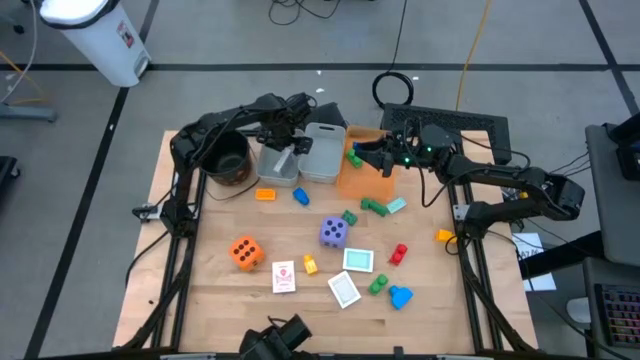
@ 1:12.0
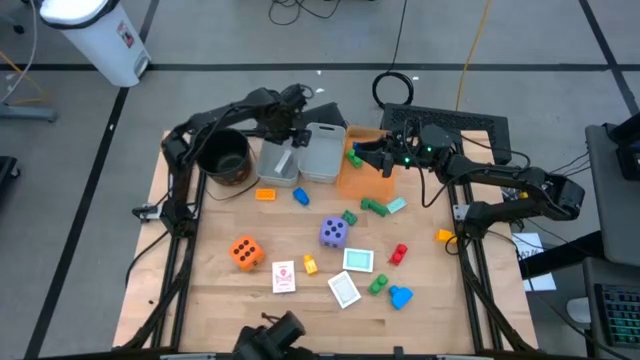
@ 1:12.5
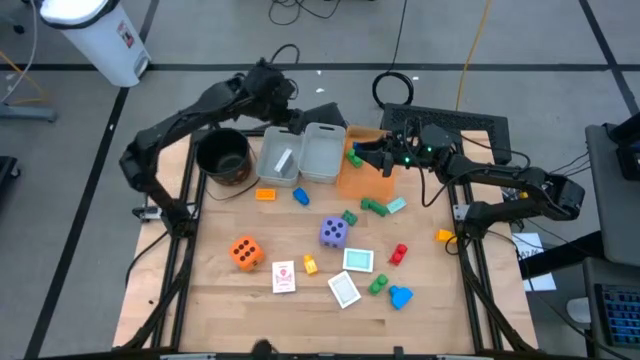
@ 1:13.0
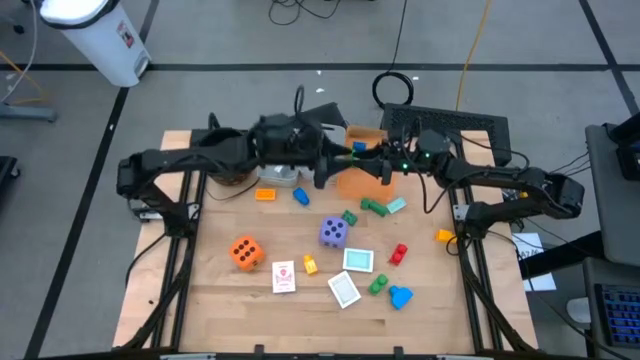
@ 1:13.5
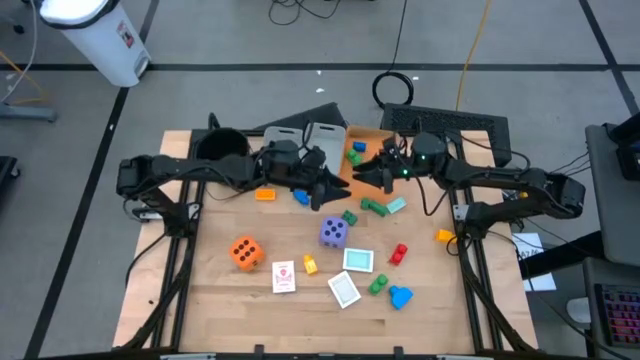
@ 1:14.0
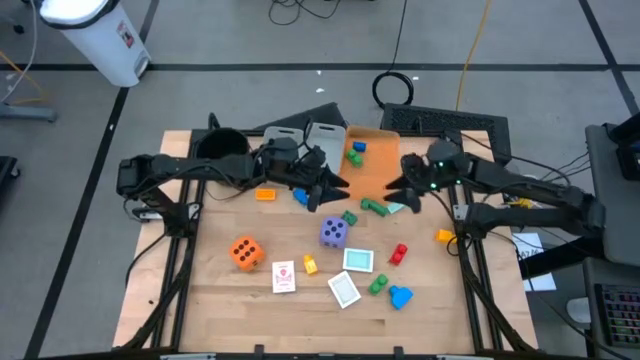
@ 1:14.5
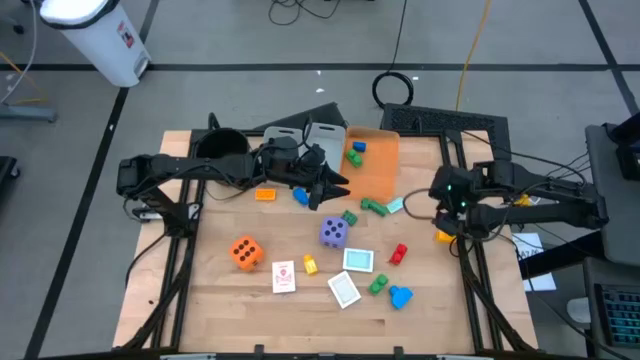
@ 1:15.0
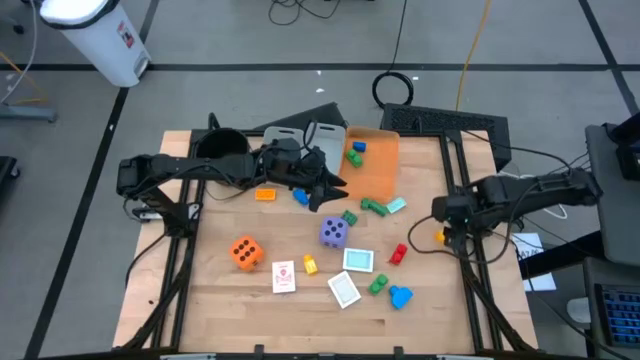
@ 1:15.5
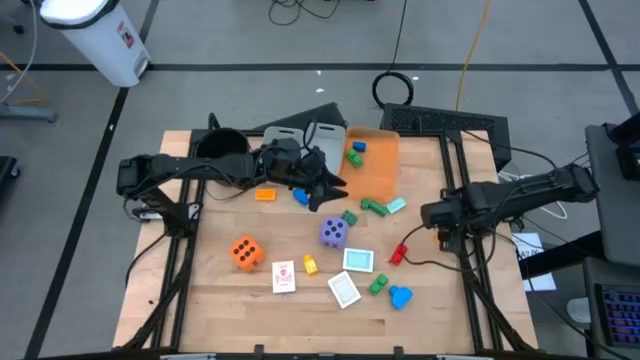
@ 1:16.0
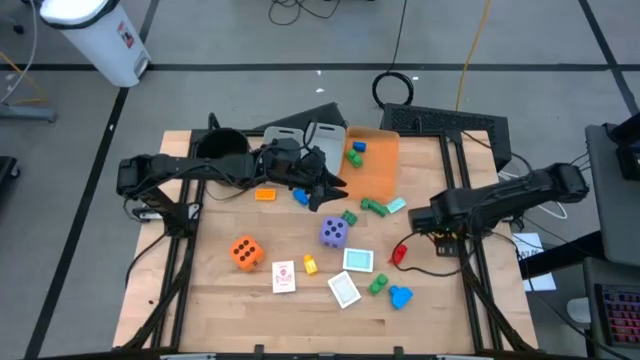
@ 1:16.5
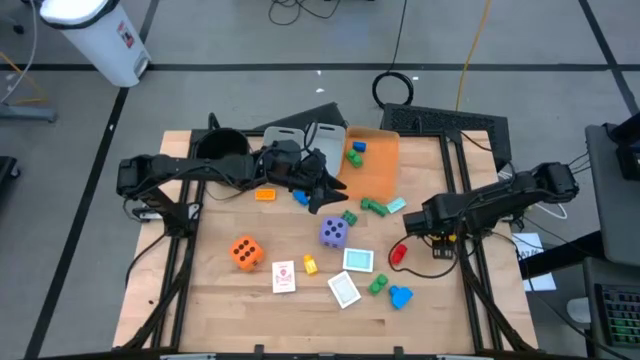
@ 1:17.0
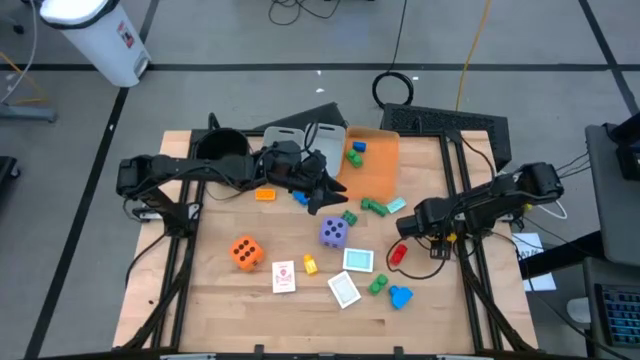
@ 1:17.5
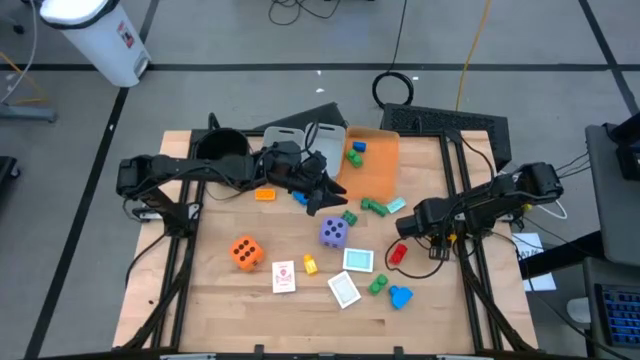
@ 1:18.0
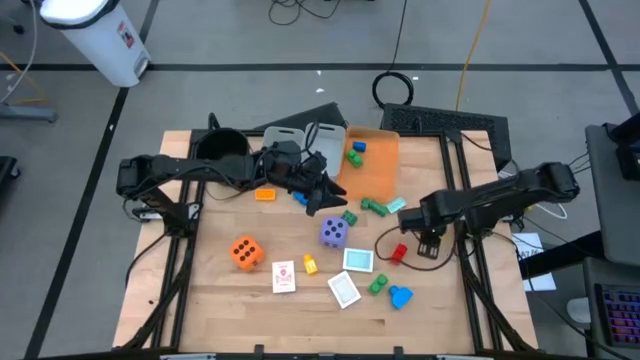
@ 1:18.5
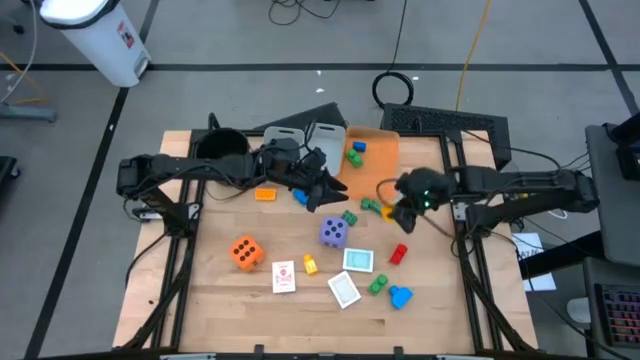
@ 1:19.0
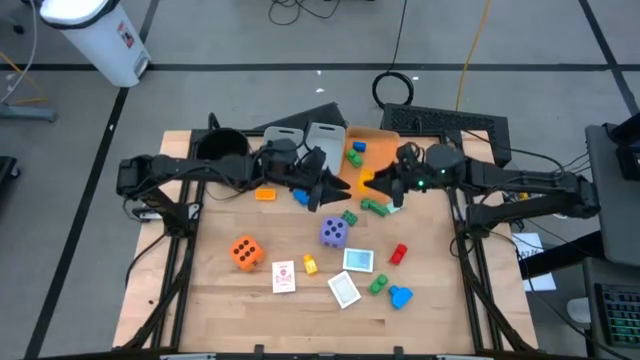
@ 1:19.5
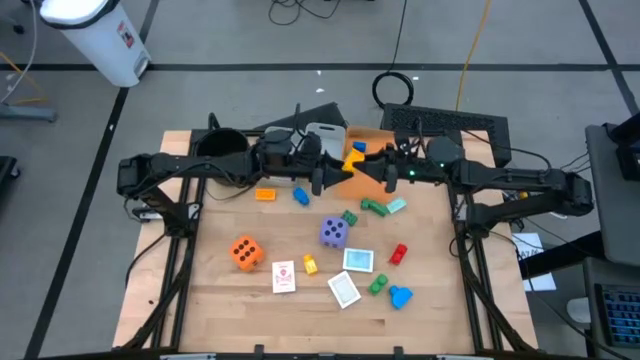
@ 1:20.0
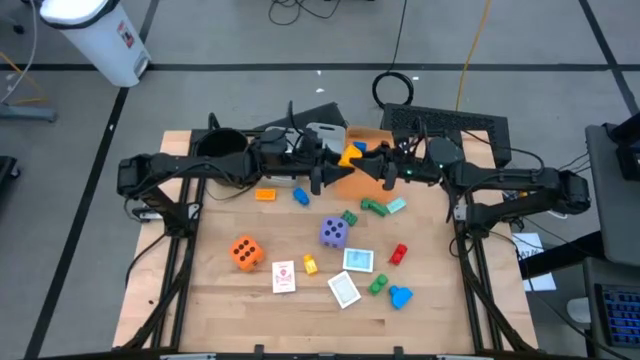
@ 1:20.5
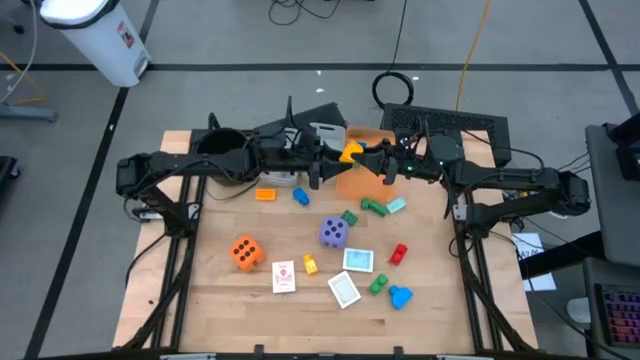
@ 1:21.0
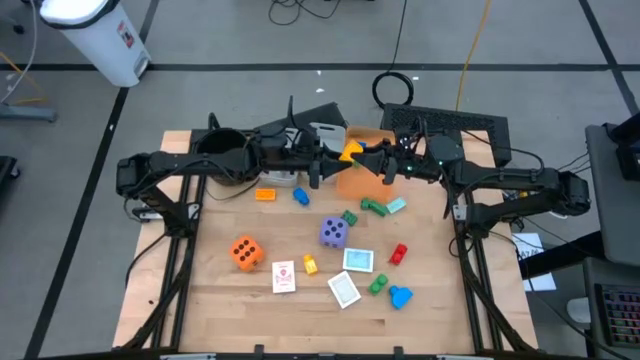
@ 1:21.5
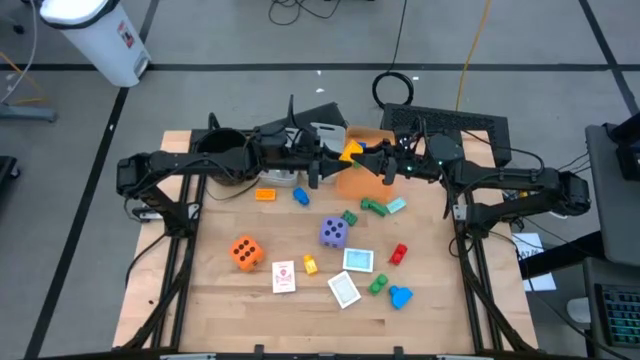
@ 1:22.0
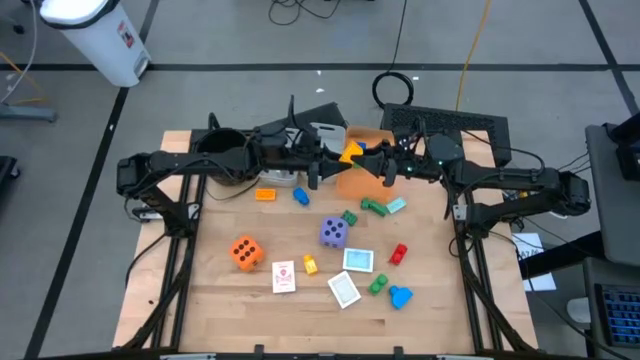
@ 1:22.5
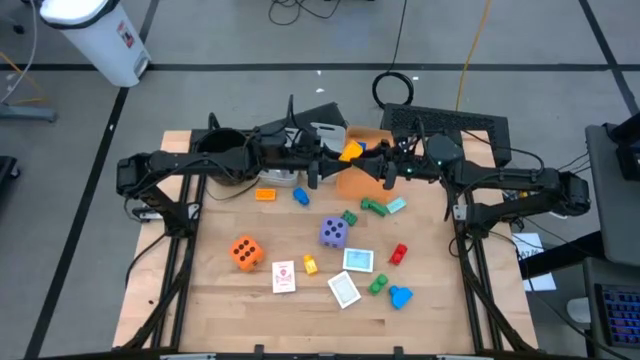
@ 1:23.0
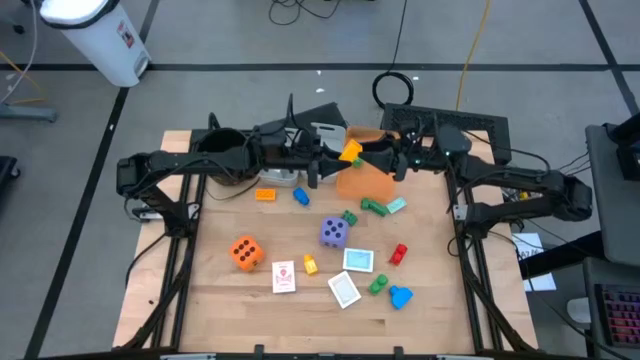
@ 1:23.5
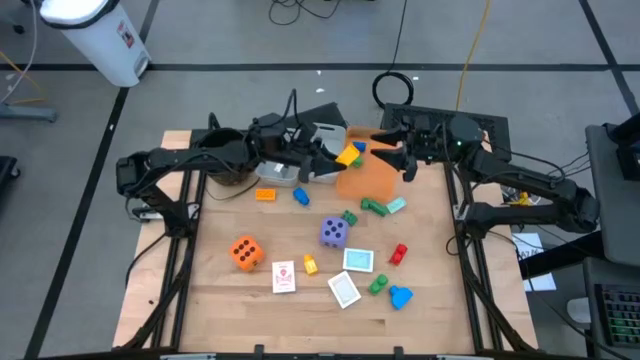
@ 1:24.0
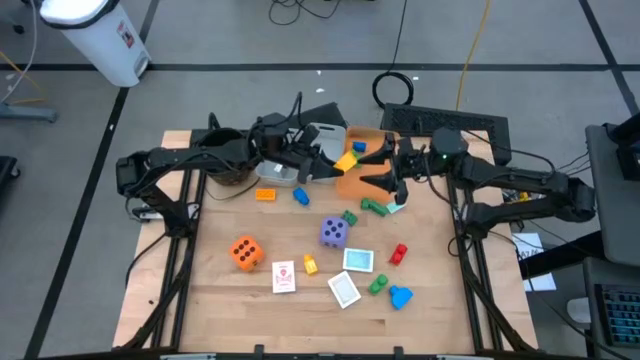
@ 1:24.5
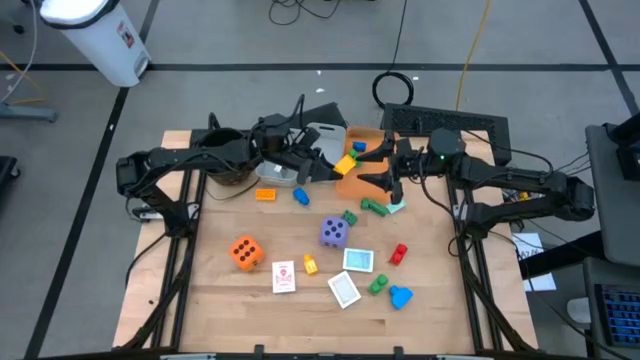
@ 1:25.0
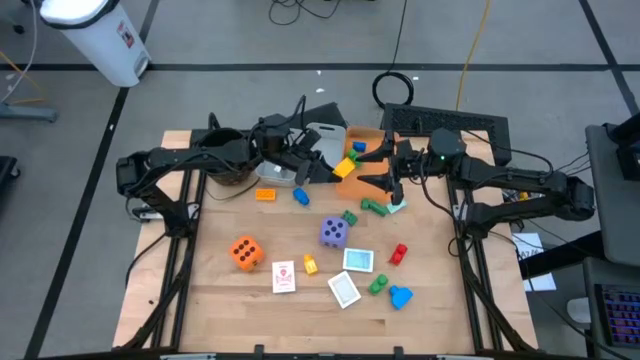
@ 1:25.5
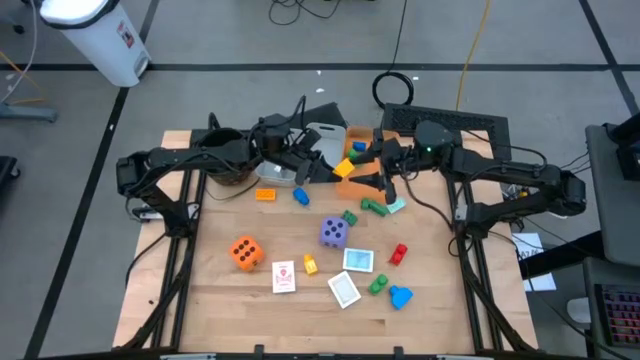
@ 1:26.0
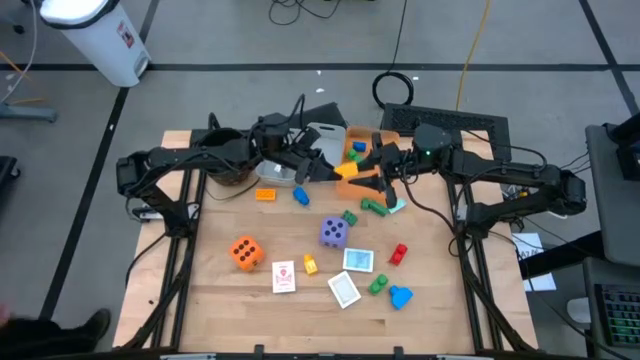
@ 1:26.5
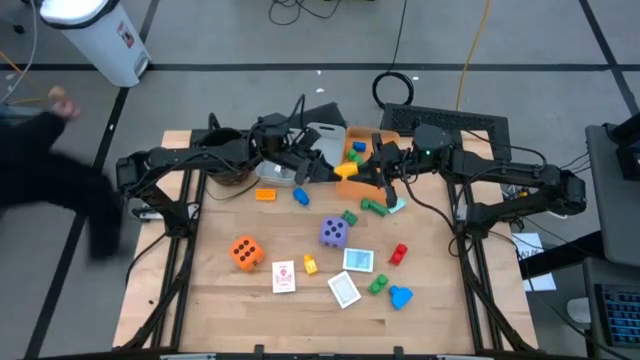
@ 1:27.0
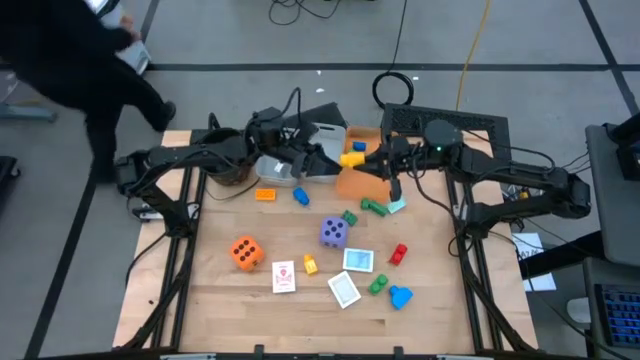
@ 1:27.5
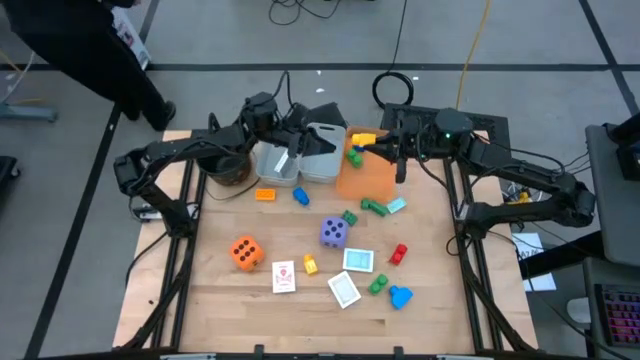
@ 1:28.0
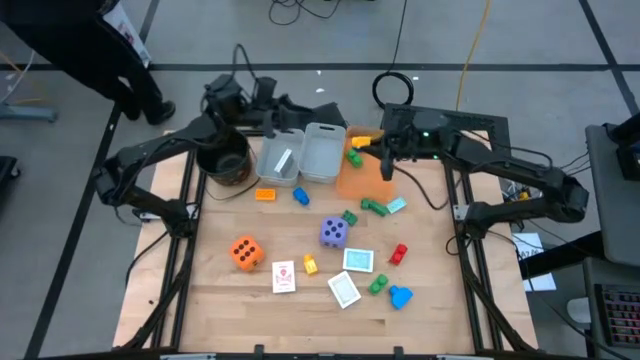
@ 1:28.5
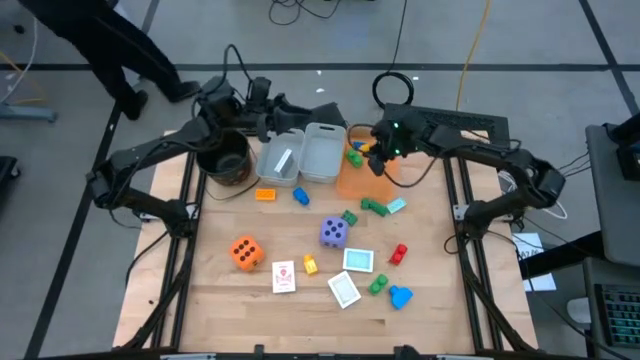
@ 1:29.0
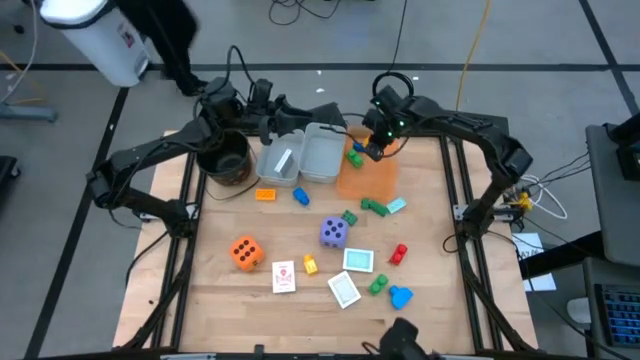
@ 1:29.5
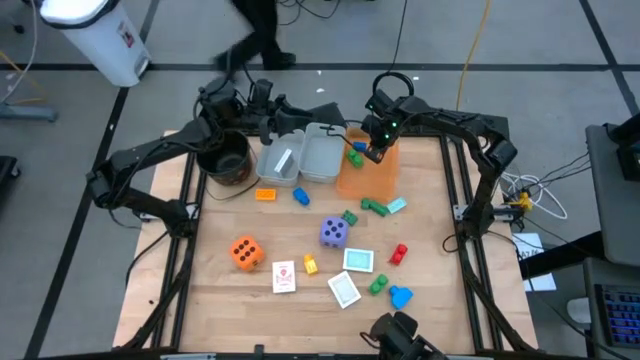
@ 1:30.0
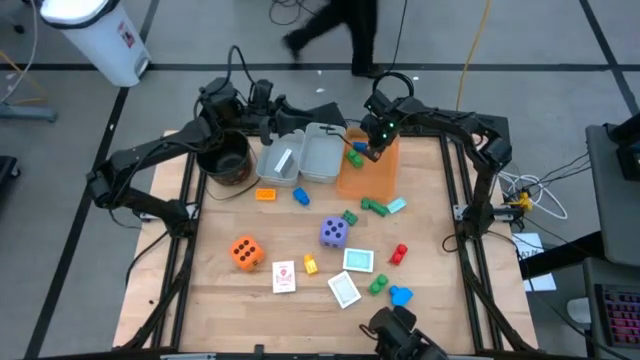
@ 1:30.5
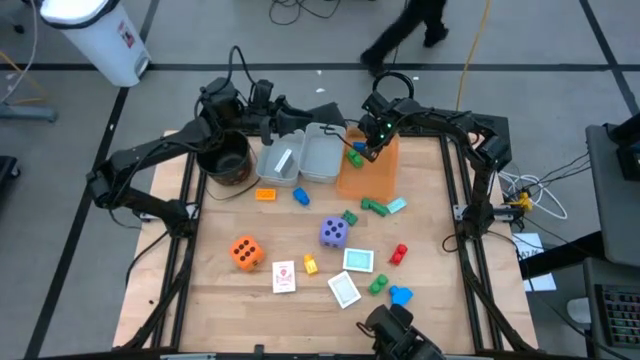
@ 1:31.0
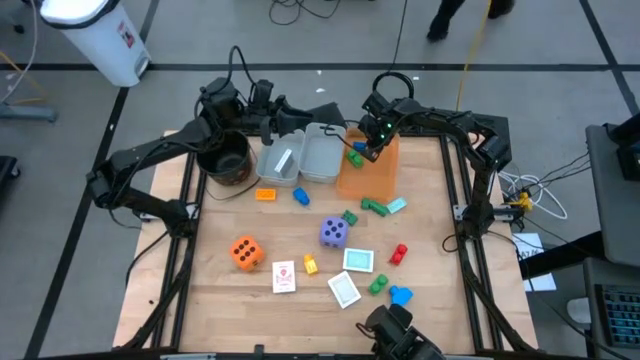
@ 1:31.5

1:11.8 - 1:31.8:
Task: Pick & Place Toys
Put the middle yellow game piece into the orange bin
